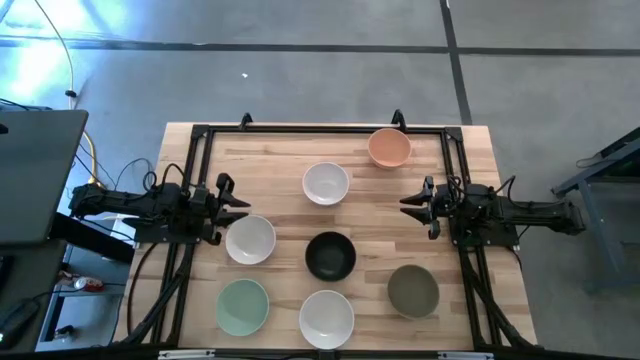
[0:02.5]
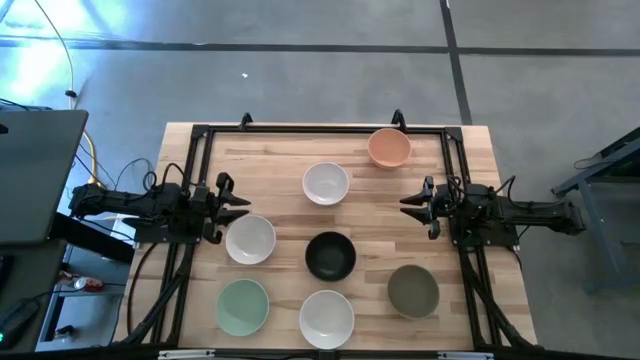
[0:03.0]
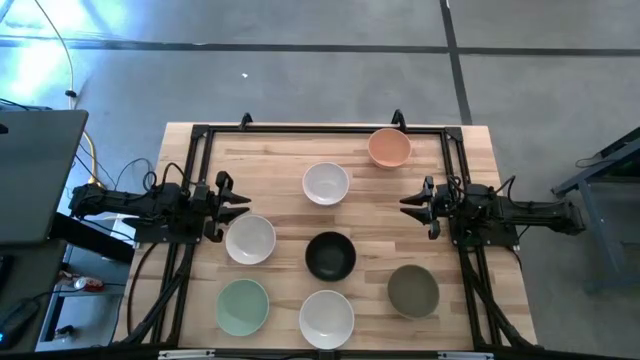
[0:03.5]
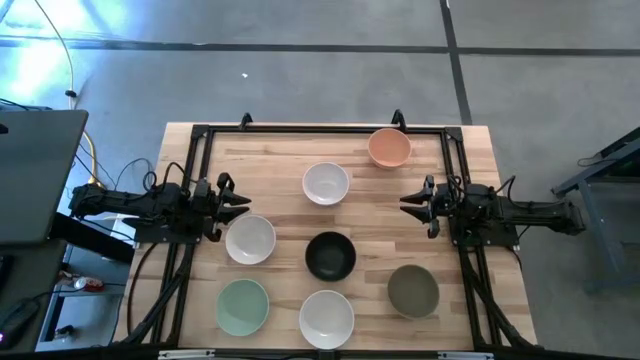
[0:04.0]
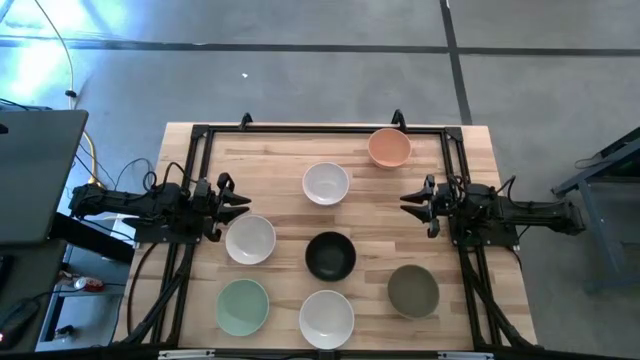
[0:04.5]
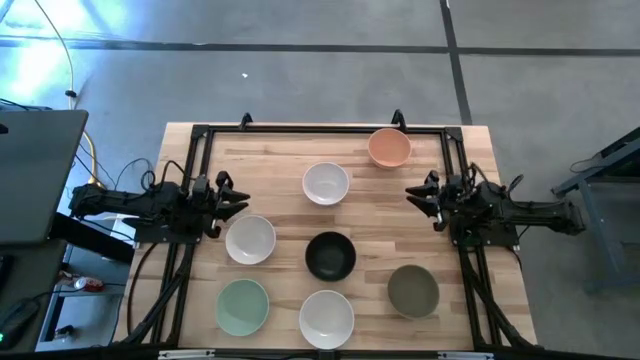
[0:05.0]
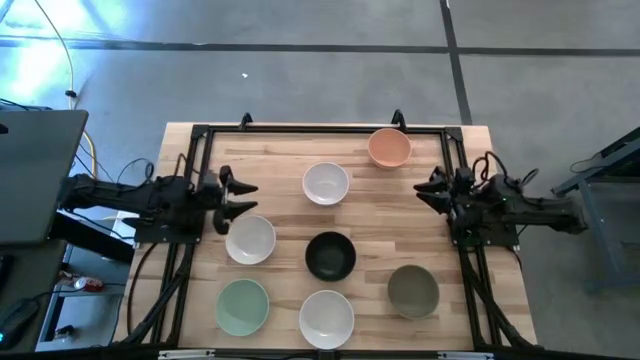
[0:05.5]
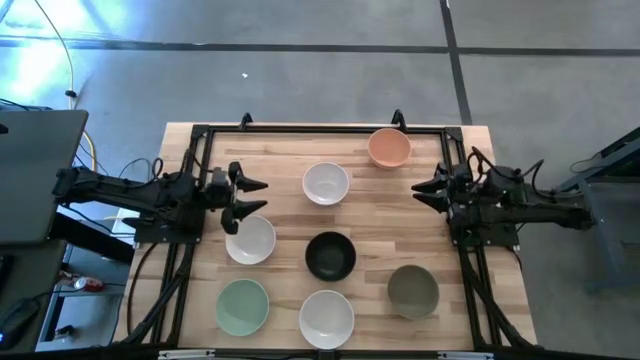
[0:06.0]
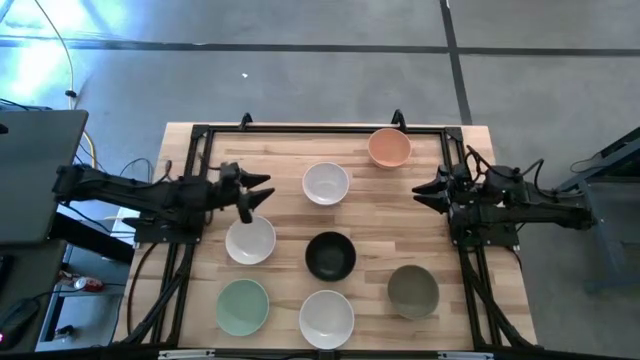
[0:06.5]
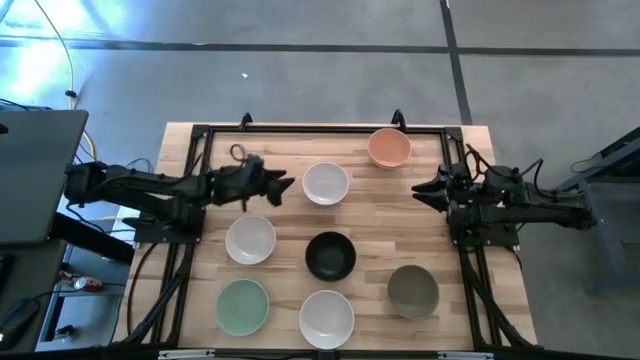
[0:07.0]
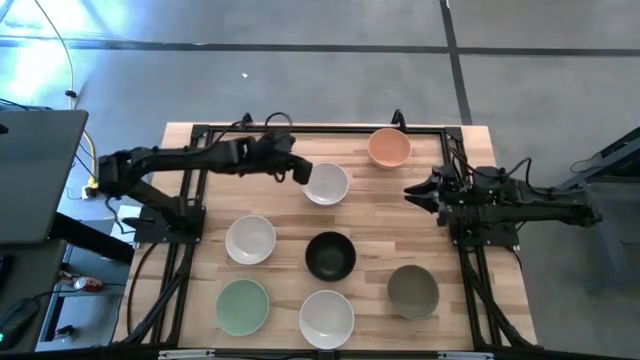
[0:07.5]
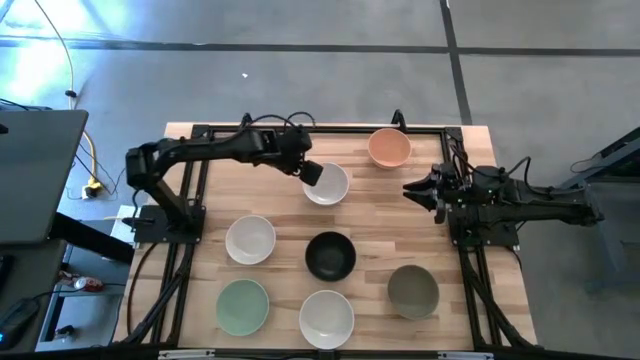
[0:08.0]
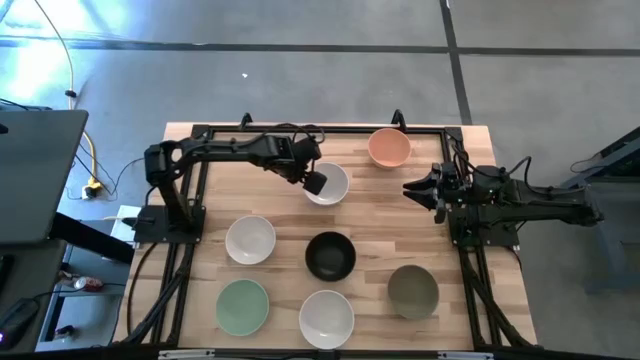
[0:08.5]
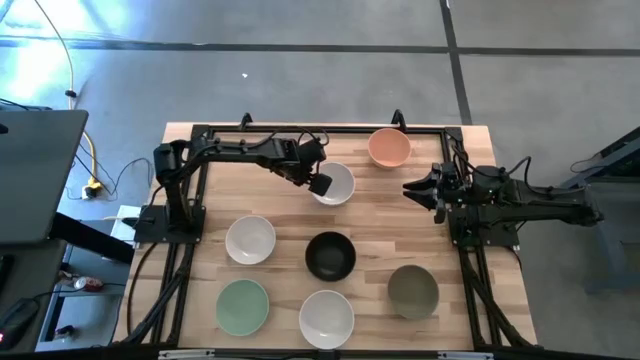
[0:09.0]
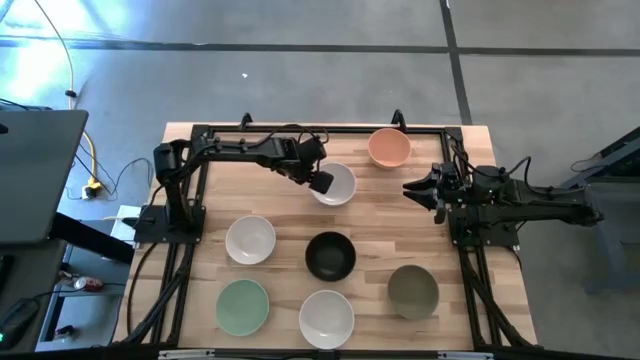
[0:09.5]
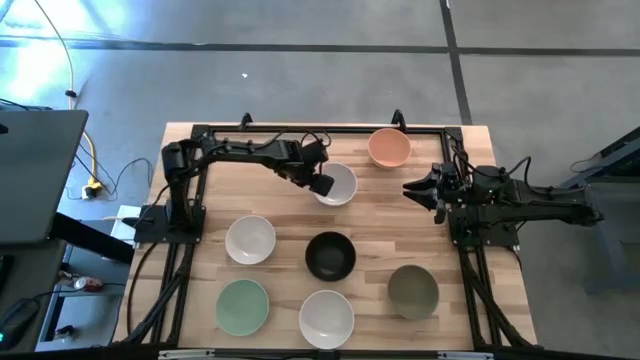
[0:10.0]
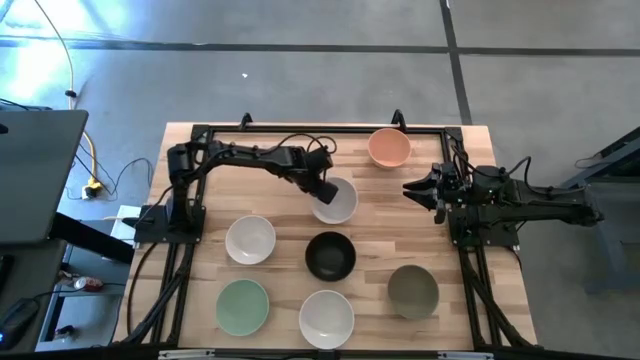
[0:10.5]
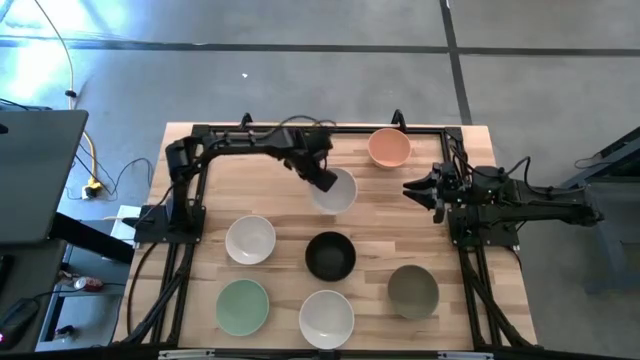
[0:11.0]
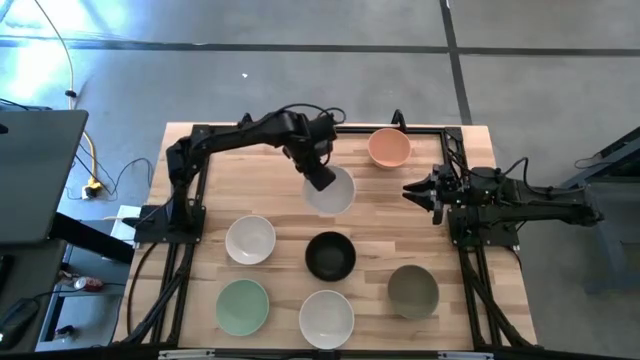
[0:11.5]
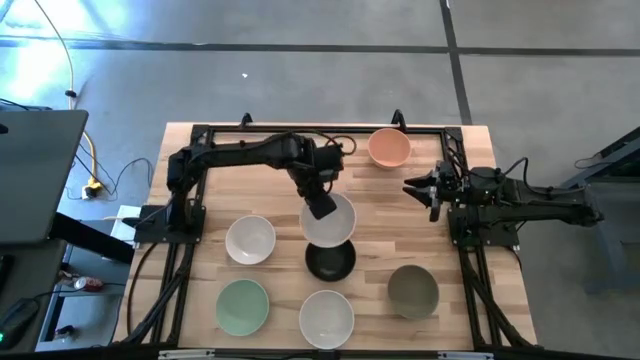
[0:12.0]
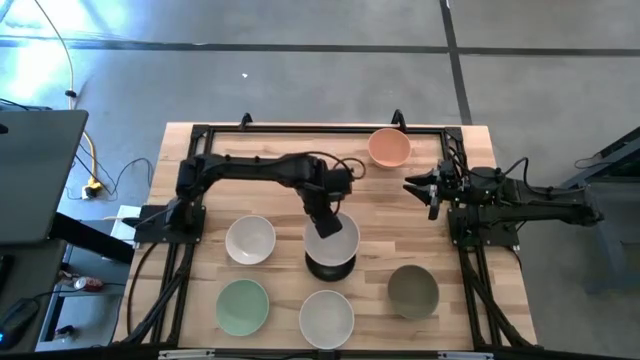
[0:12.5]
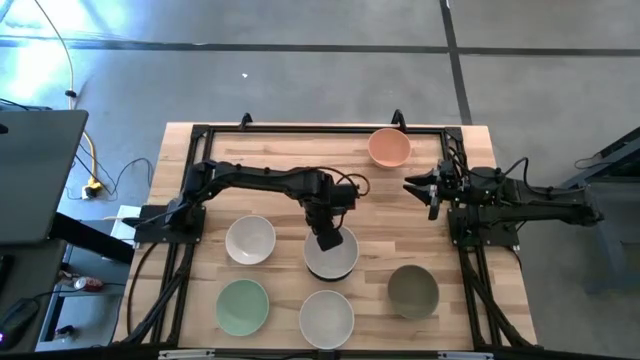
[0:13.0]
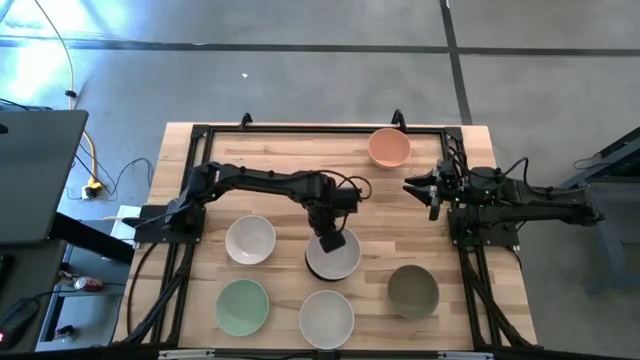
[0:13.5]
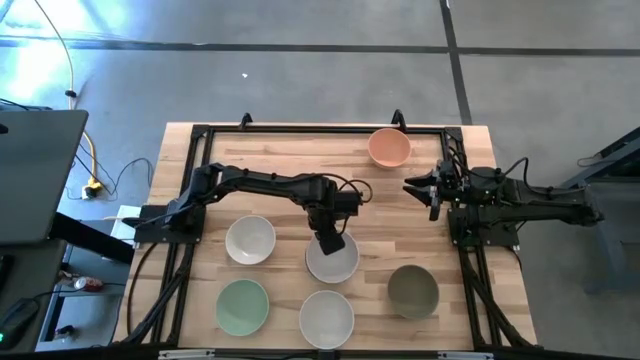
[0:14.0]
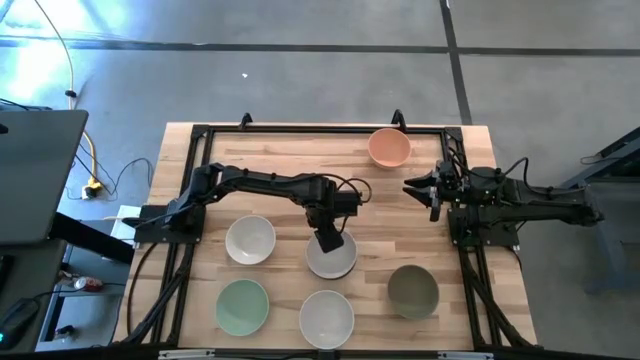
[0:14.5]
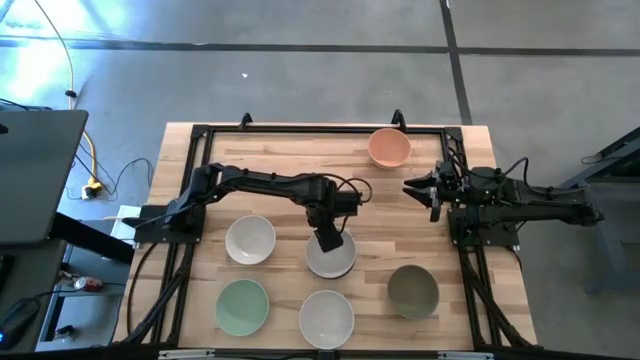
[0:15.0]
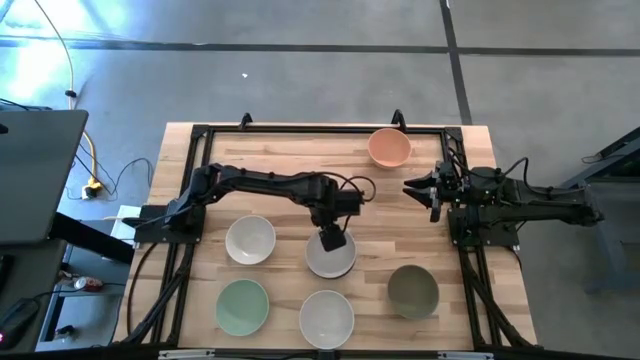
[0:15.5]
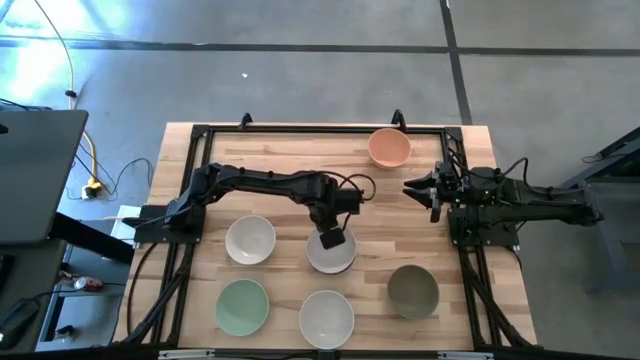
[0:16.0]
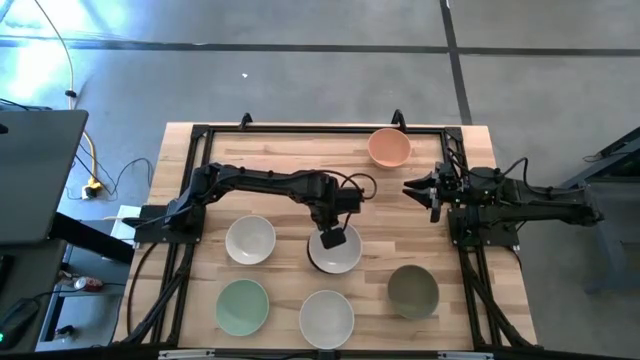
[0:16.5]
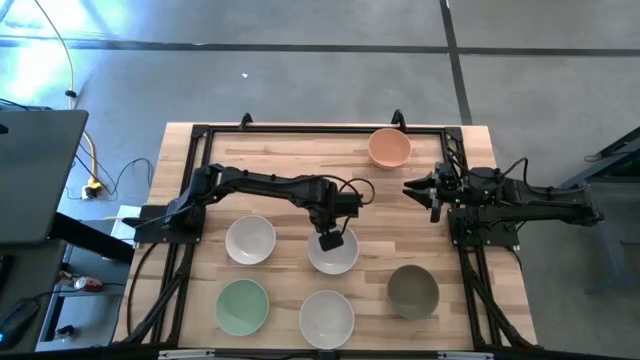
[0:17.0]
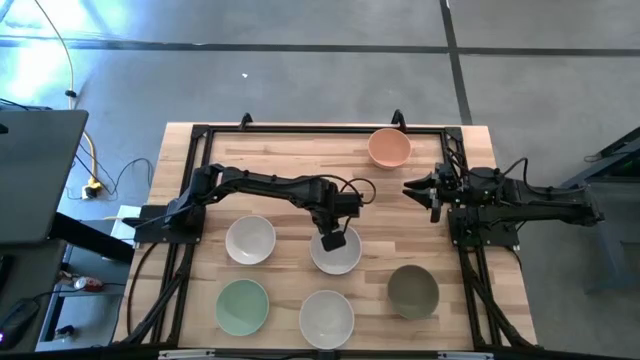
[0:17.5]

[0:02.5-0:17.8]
Task: Nest bowls inside each other
Stack the top white bowl on top of the black bowl

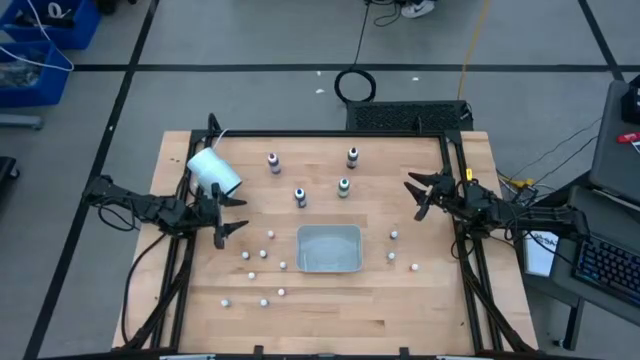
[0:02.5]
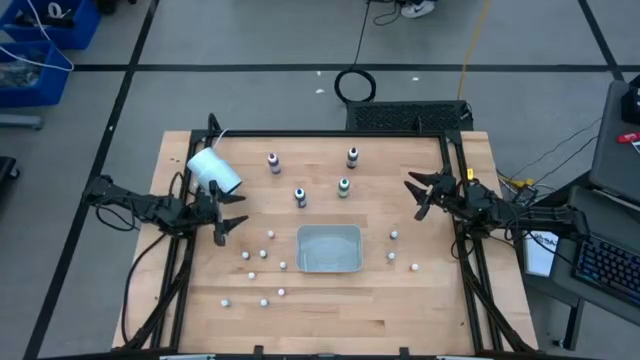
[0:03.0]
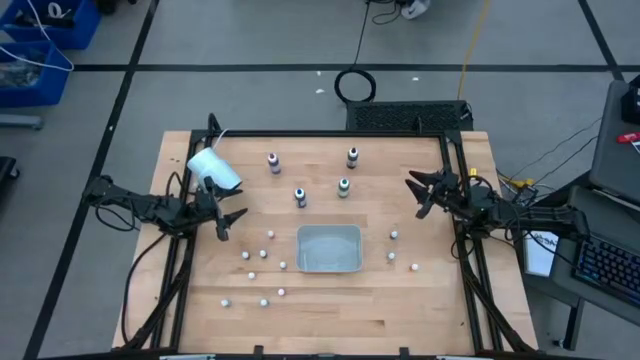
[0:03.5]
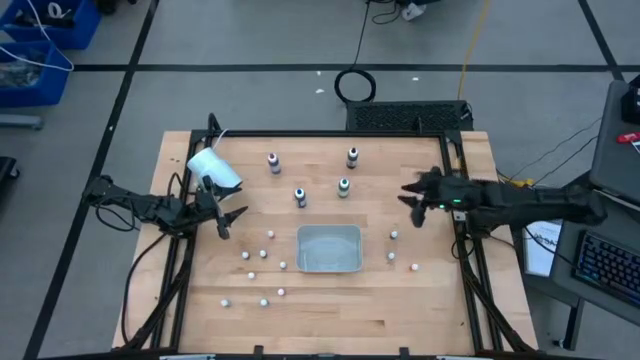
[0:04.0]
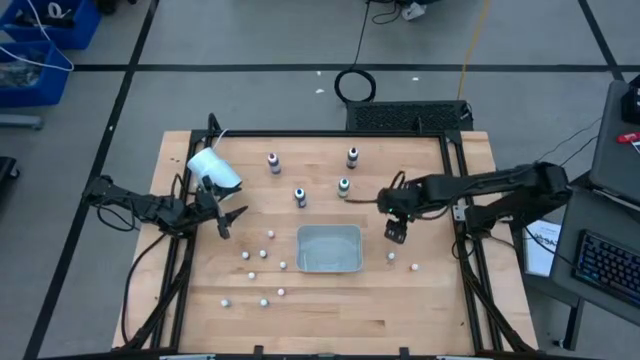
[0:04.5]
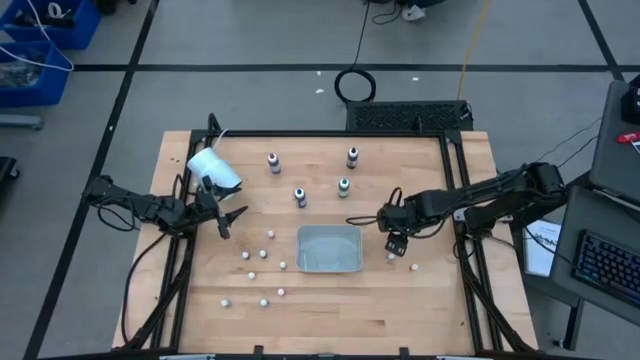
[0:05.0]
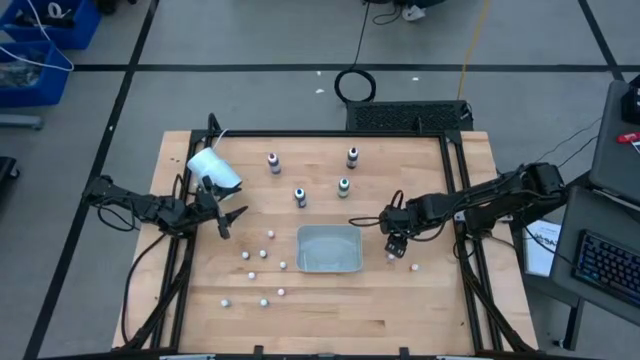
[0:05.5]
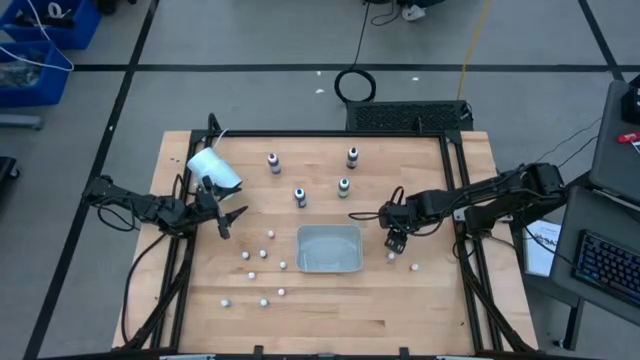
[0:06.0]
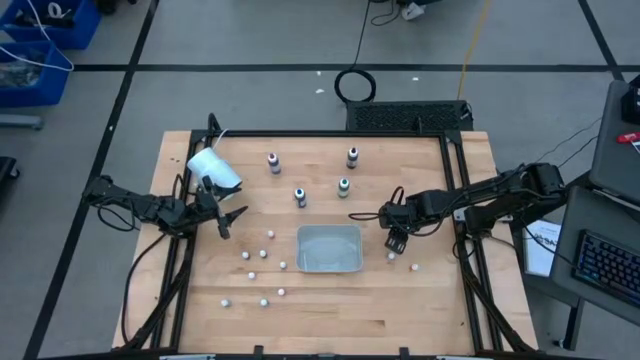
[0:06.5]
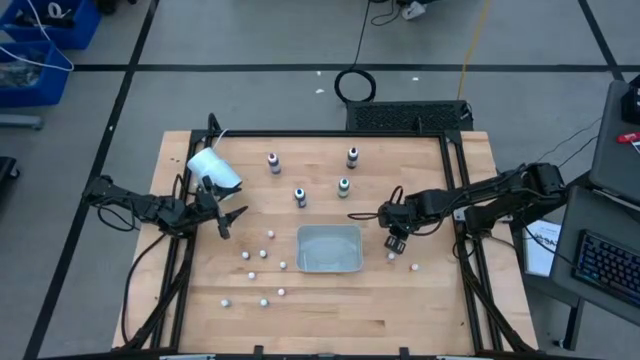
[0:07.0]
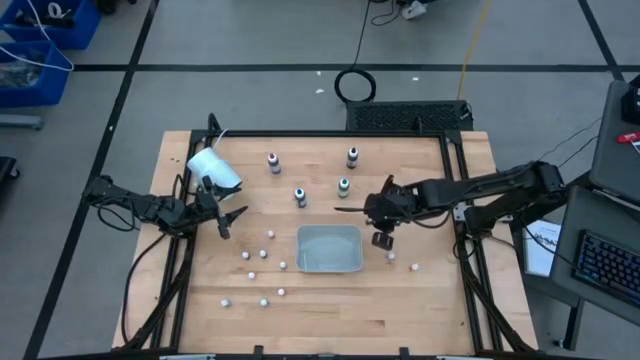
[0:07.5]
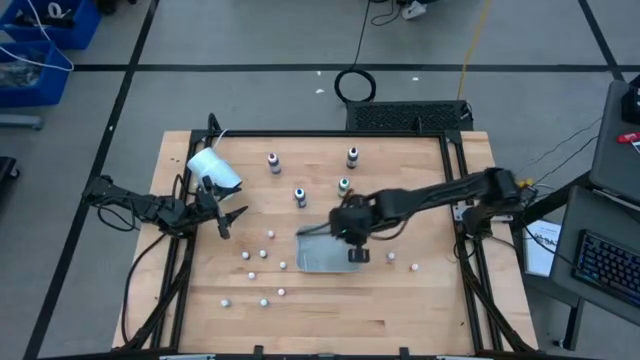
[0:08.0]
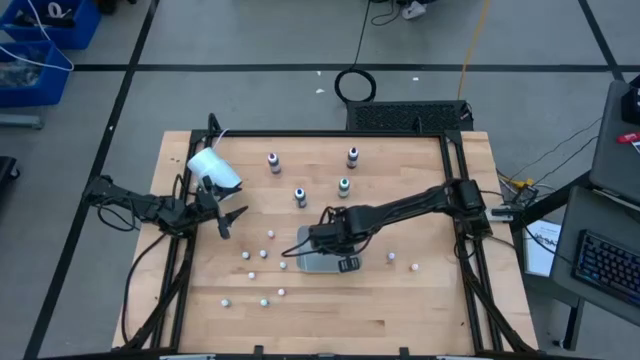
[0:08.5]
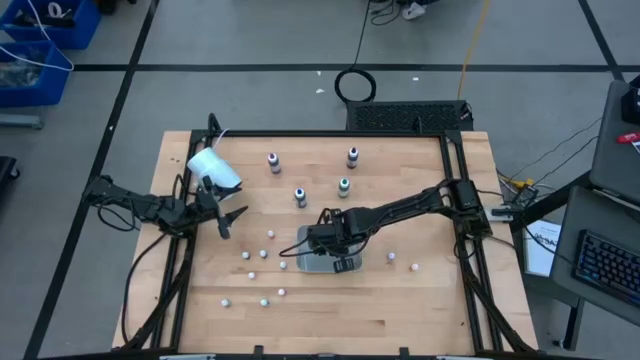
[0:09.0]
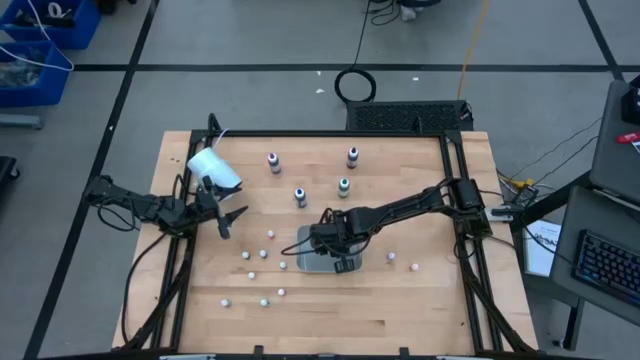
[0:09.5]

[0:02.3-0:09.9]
Task: Pick & Place food coloring
Put the black food coloring bottle into the bin
